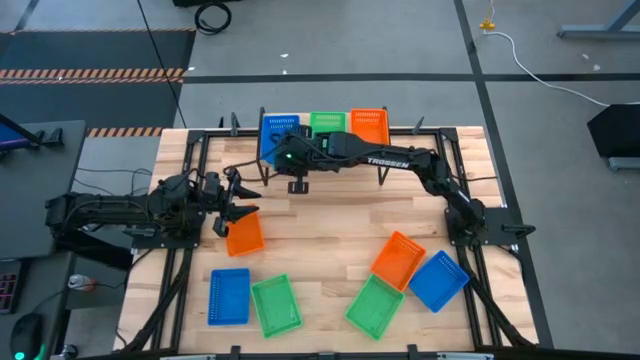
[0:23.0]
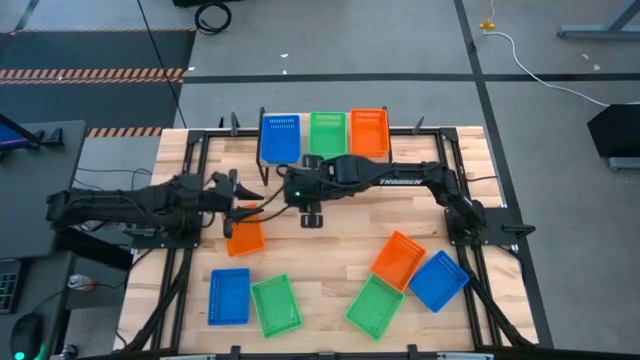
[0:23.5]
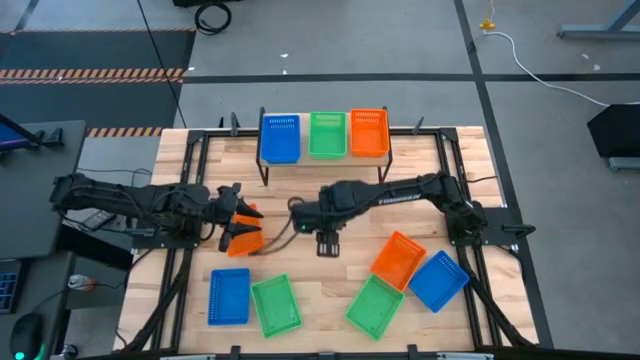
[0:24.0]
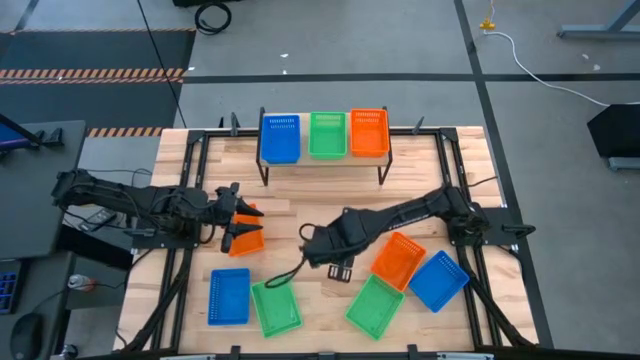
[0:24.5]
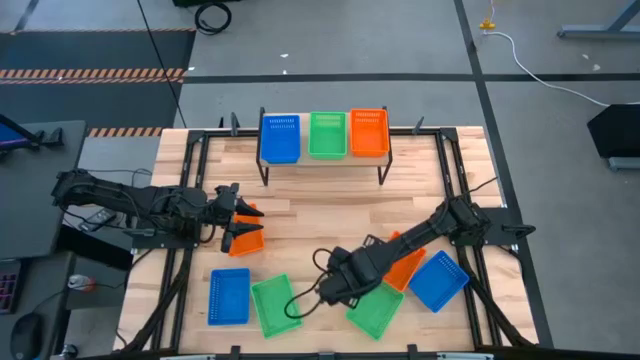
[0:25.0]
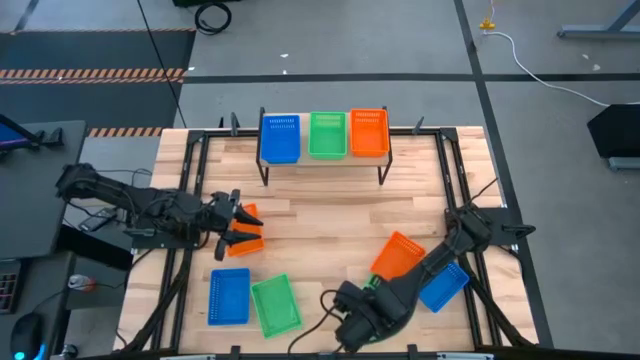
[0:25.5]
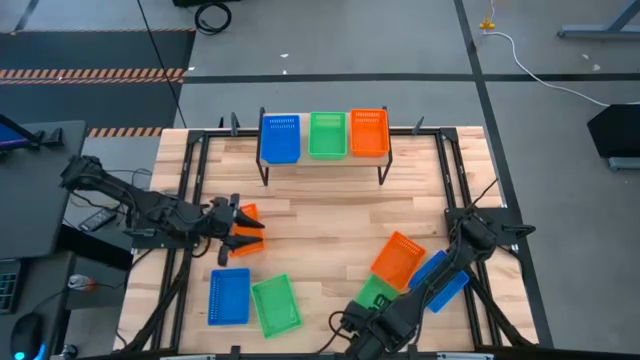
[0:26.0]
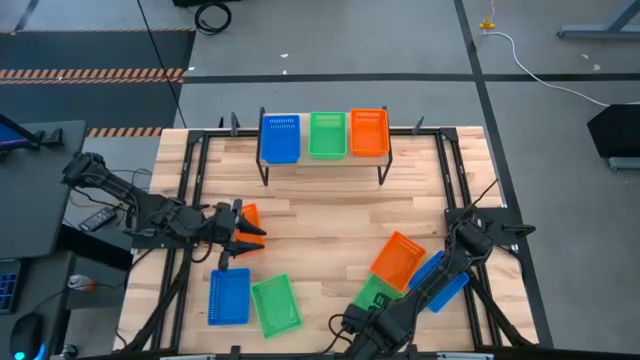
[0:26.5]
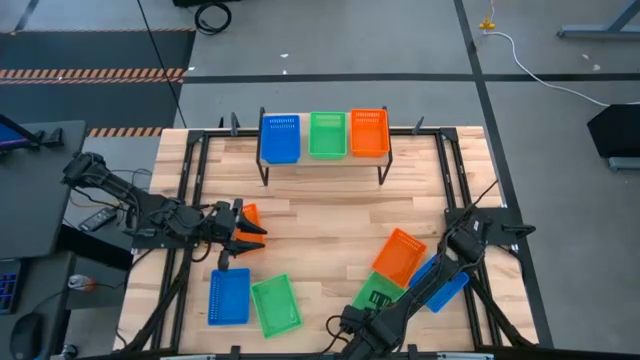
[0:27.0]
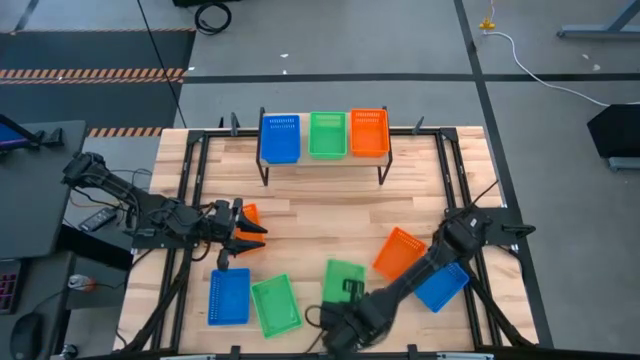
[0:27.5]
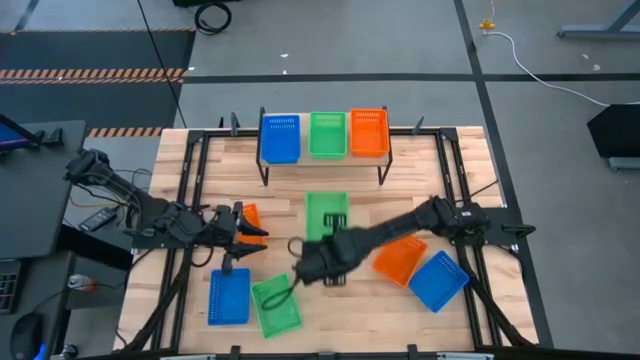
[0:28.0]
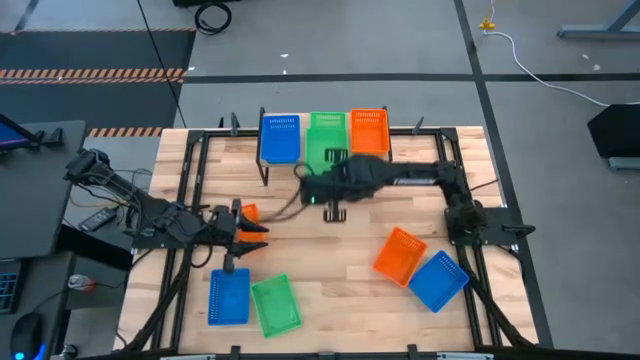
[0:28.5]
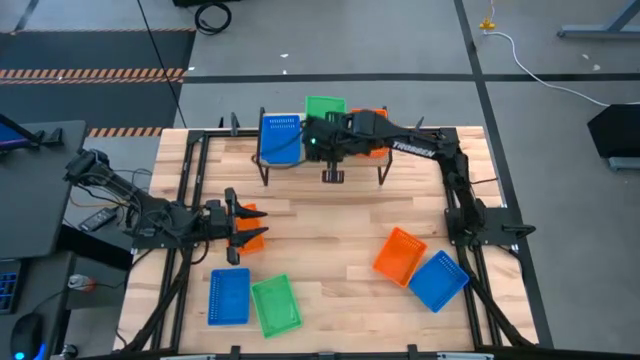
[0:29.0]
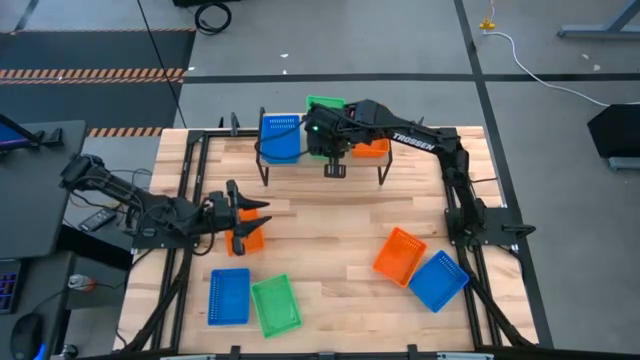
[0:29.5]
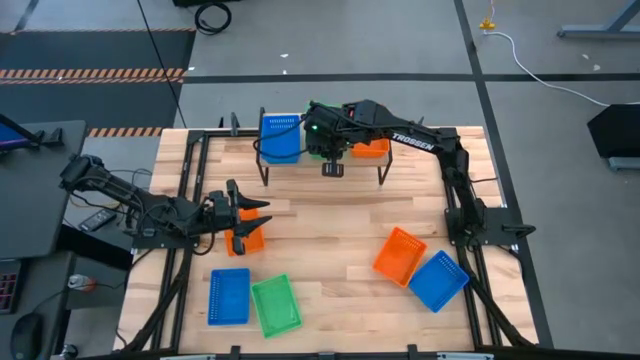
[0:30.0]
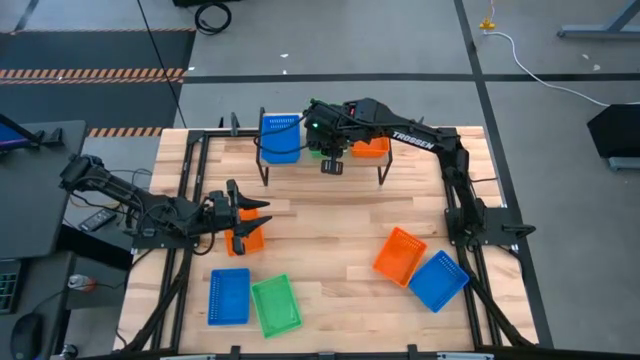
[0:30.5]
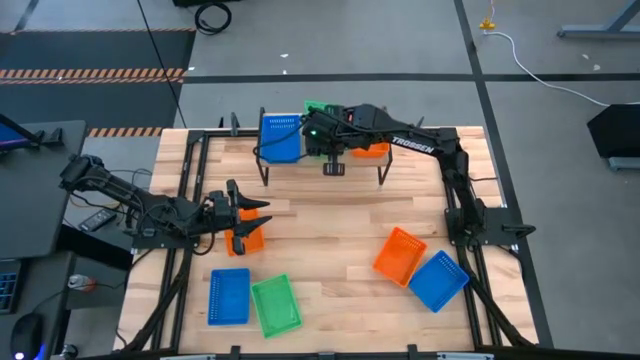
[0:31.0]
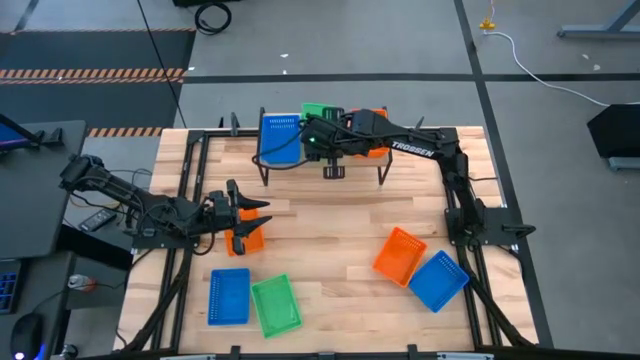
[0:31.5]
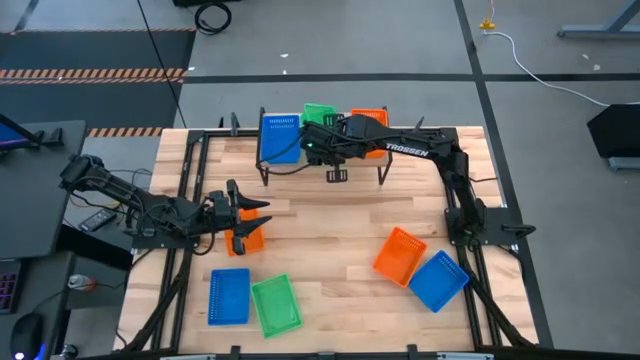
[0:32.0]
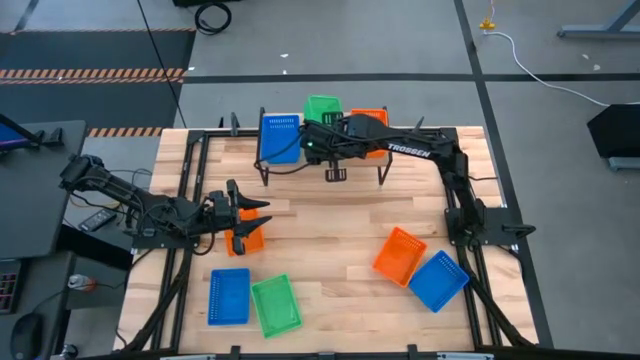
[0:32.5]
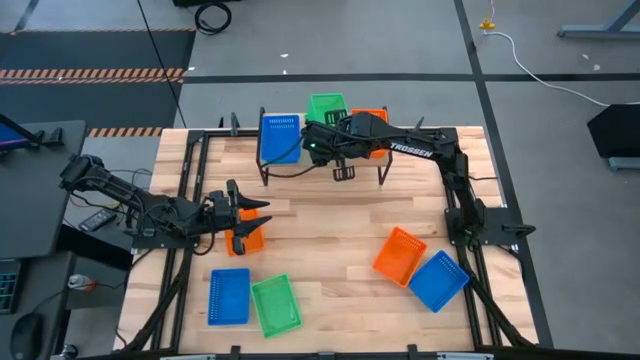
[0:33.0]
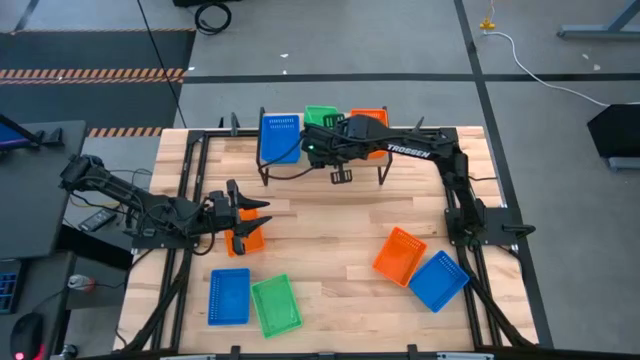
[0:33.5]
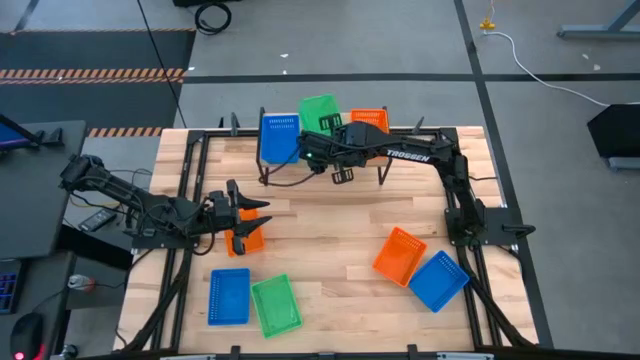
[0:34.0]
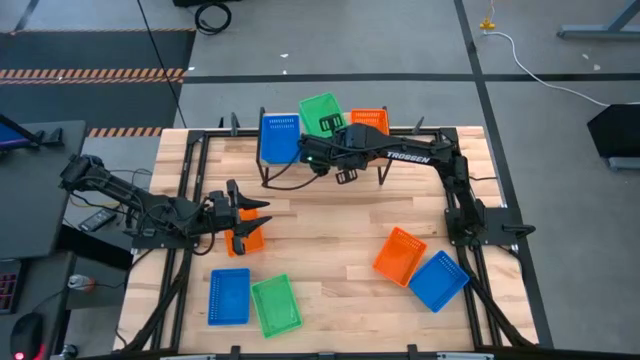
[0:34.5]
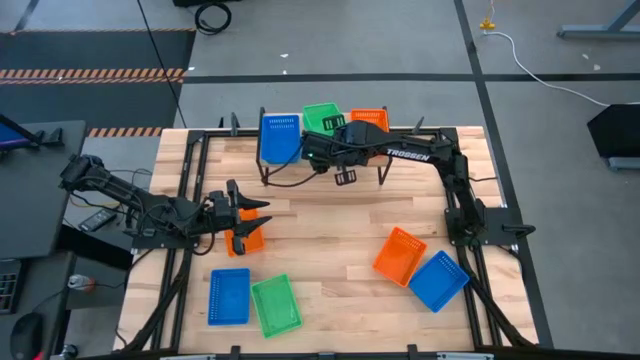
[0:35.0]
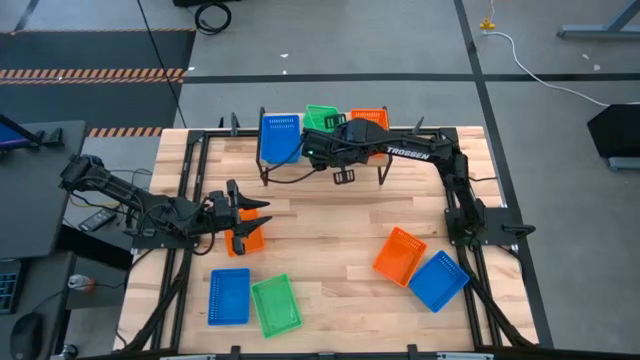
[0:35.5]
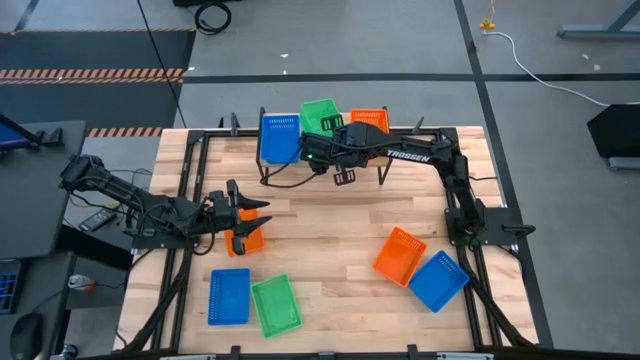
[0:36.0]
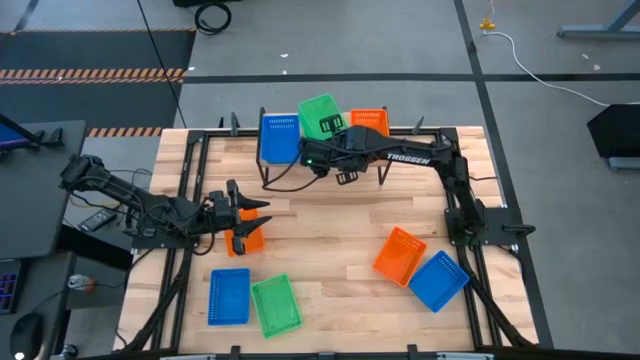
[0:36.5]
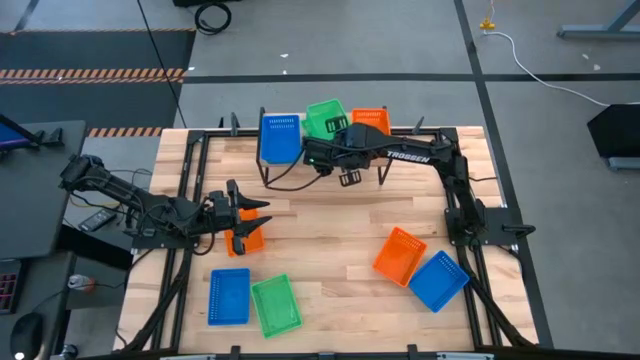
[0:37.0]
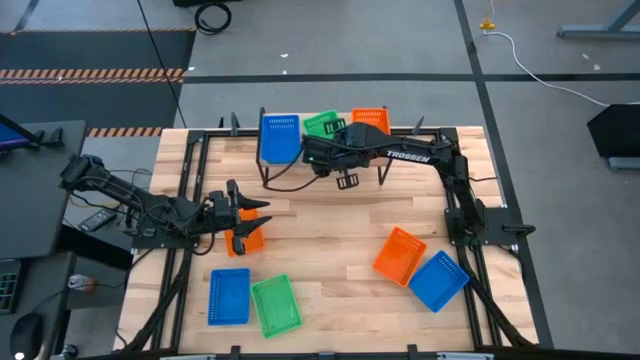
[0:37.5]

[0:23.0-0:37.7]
Task: Stack baskets on shelf by color
Stack the right green bin on top of the green bin on the shelf

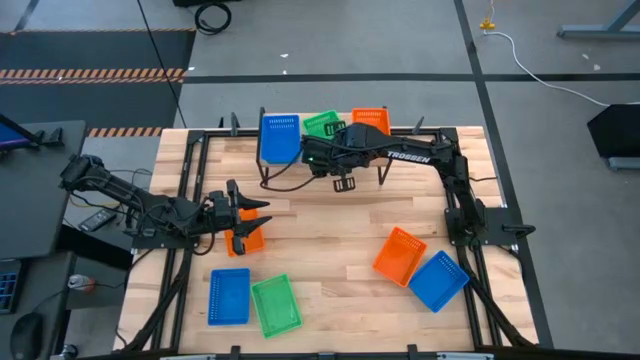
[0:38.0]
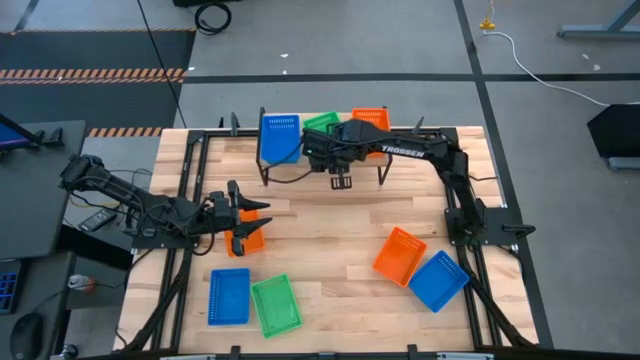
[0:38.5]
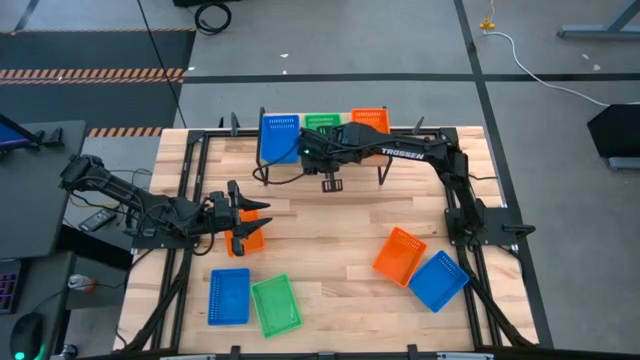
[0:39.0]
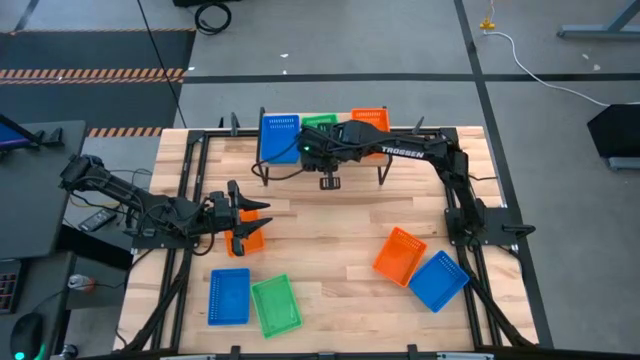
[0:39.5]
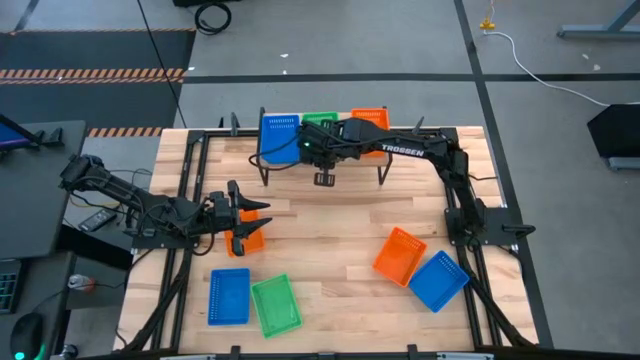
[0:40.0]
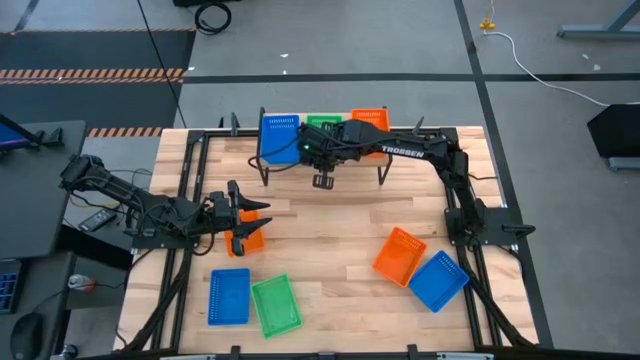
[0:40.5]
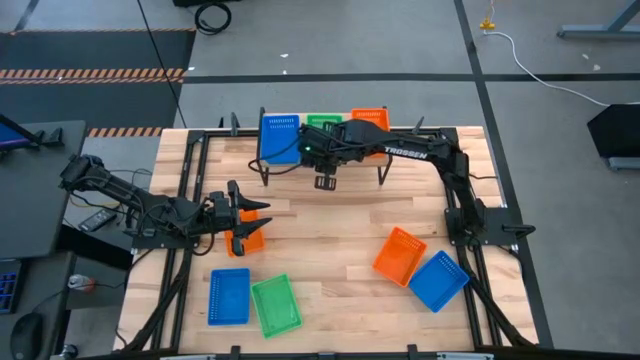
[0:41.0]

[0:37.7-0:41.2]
Adjust the green bin on the shelf

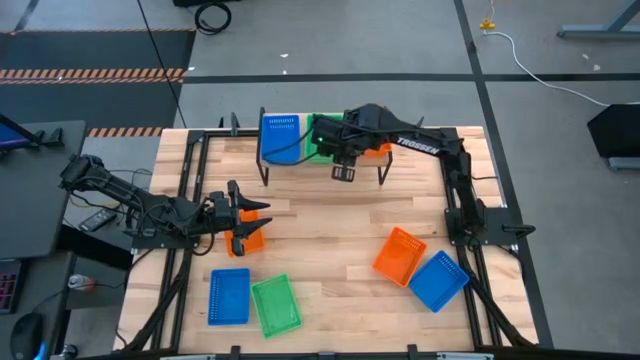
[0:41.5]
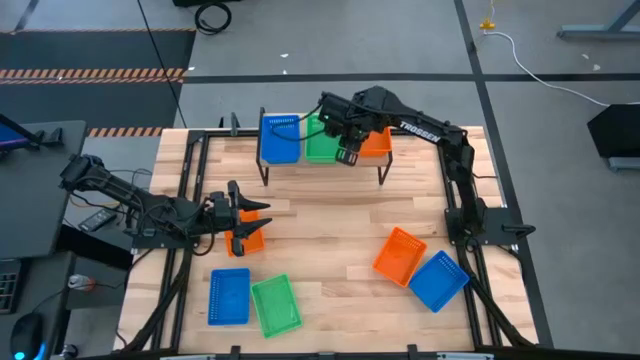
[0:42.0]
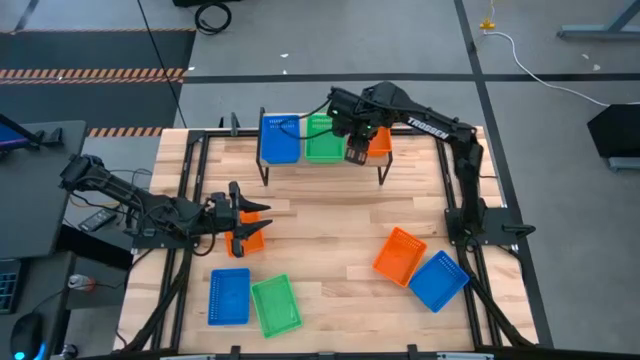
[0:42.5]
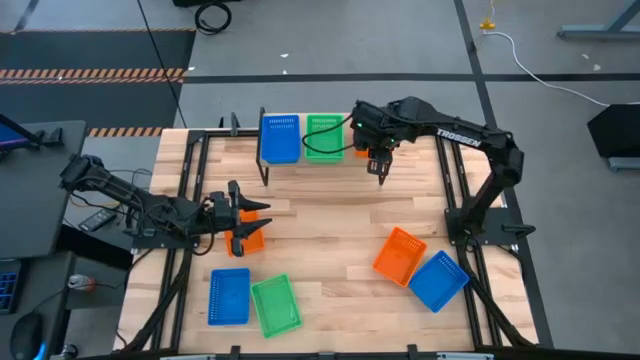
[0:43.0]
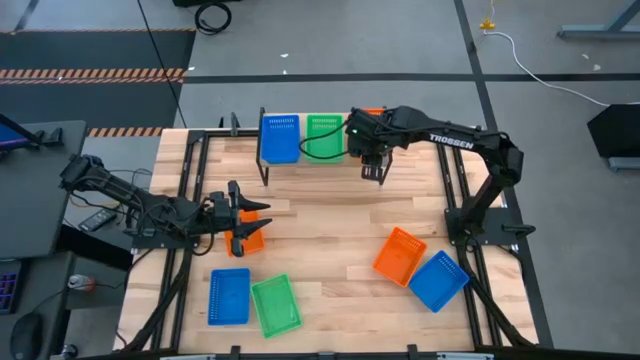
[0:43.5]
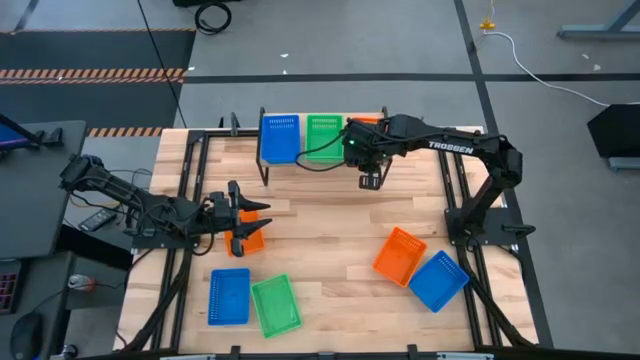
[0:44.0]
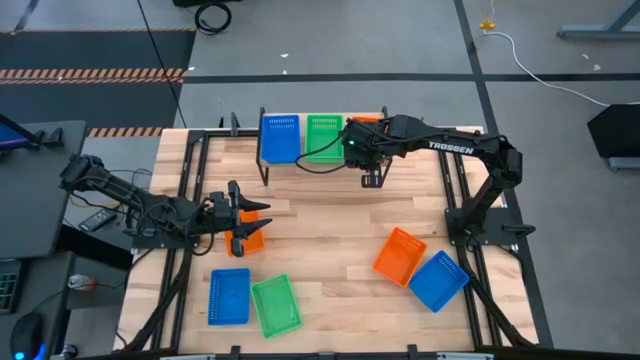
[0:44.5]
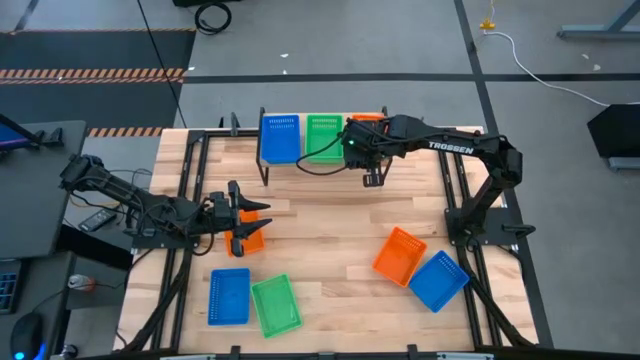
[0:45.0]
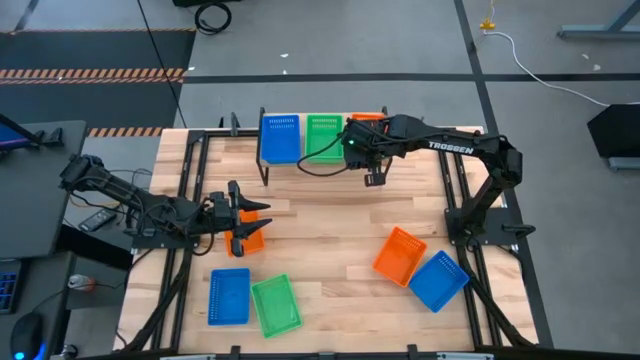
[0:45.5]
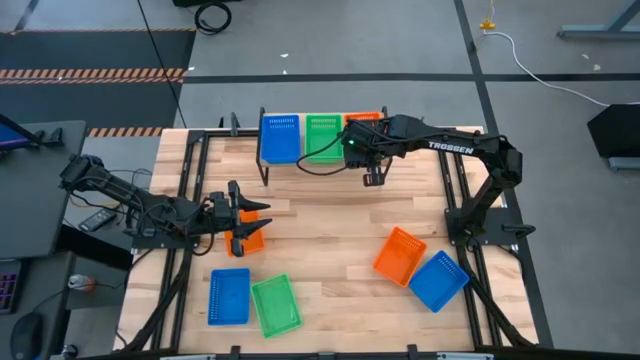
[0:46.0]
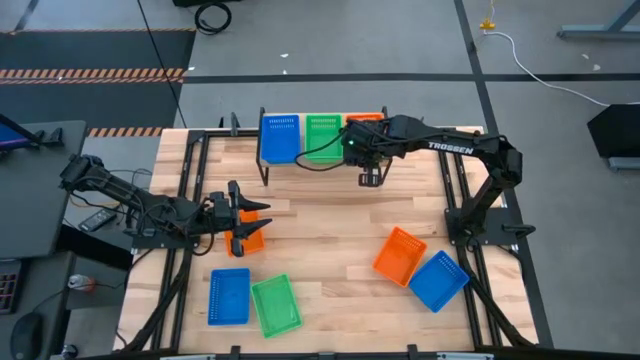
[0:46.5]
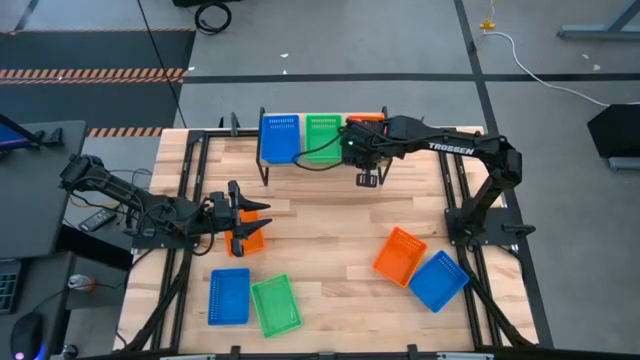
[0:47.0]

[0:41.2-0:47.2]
Adjust the orange bin on the shelf
